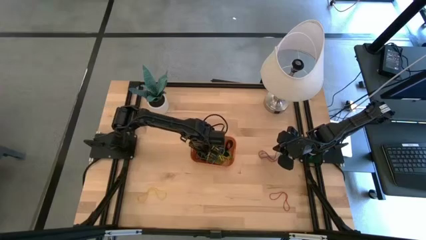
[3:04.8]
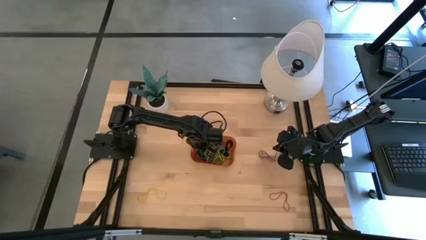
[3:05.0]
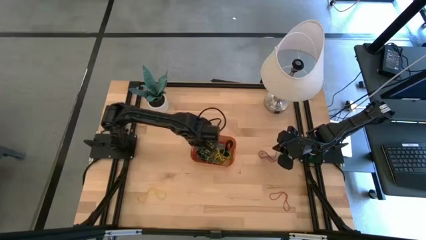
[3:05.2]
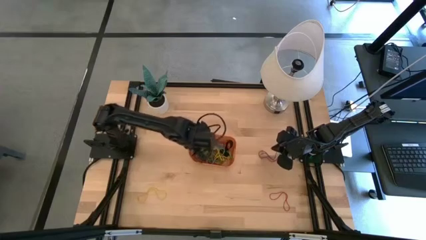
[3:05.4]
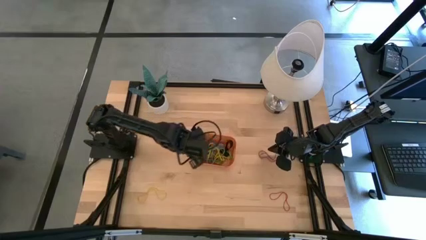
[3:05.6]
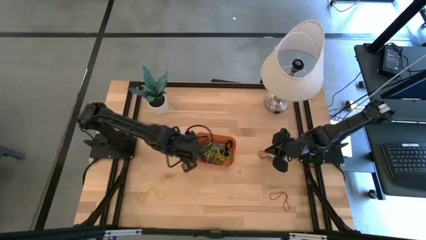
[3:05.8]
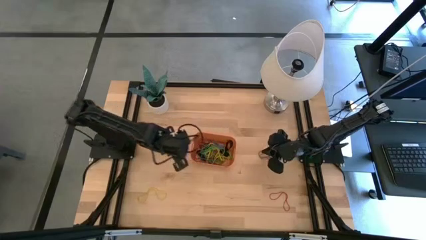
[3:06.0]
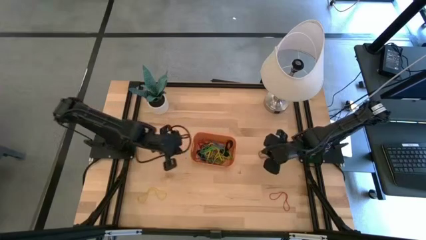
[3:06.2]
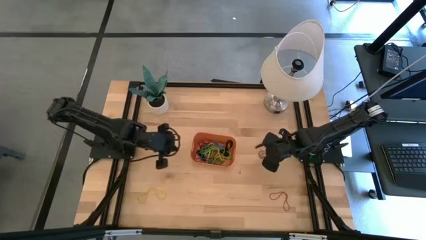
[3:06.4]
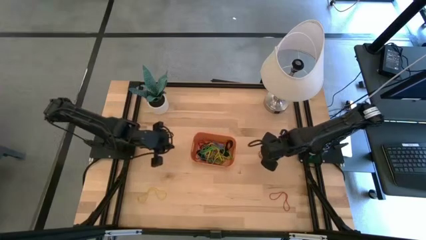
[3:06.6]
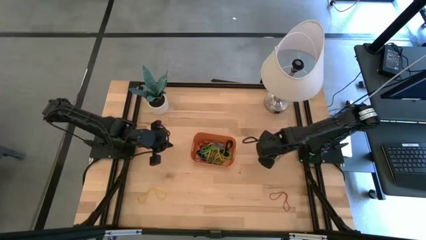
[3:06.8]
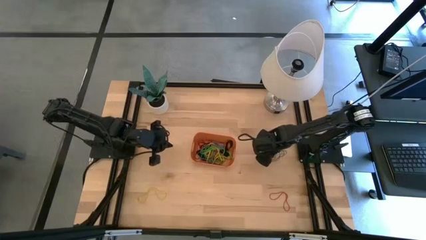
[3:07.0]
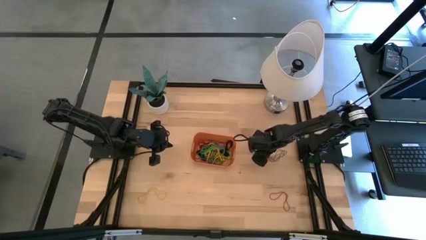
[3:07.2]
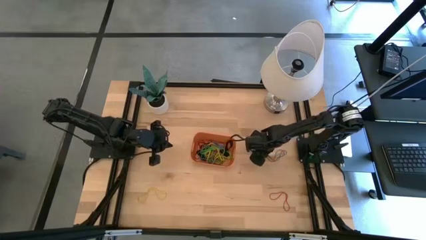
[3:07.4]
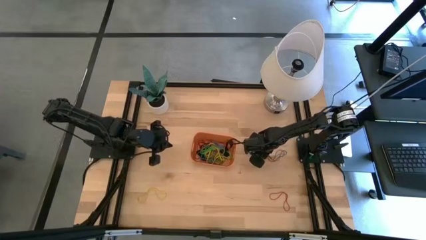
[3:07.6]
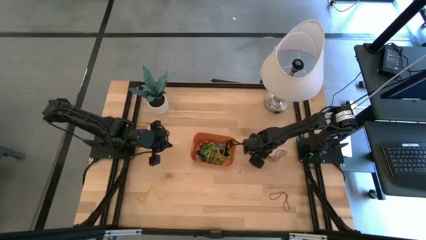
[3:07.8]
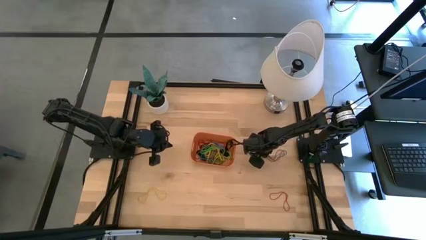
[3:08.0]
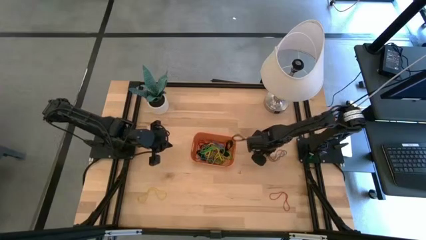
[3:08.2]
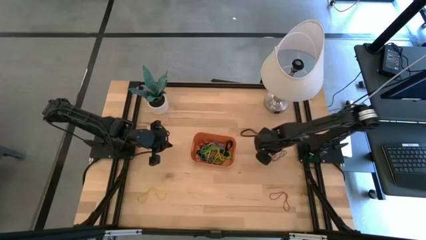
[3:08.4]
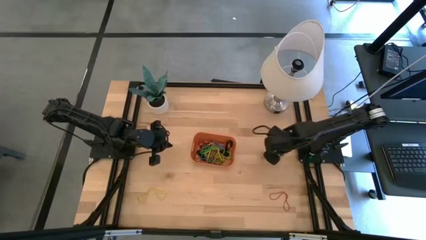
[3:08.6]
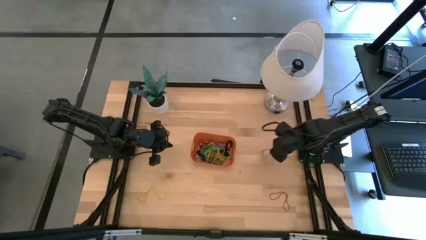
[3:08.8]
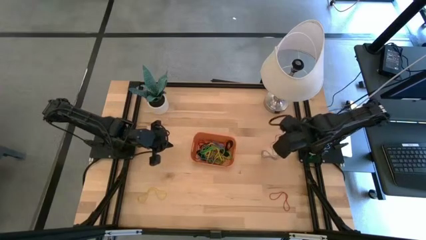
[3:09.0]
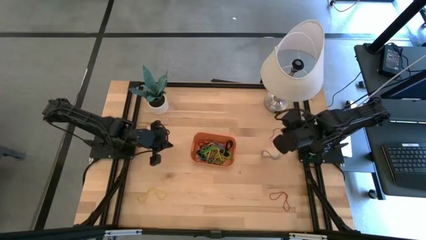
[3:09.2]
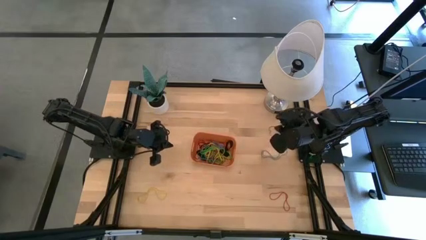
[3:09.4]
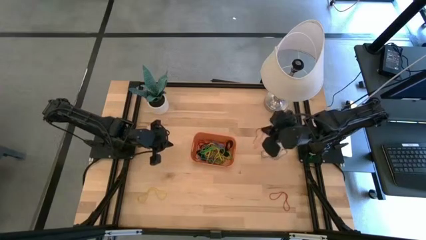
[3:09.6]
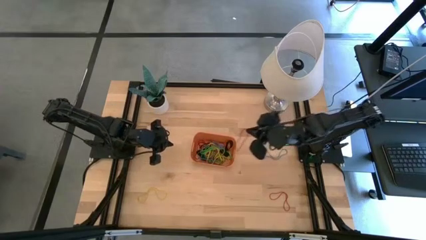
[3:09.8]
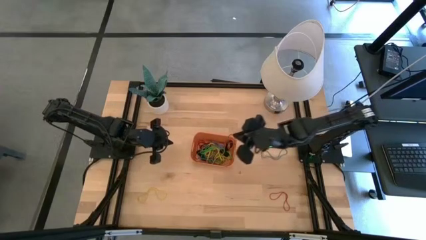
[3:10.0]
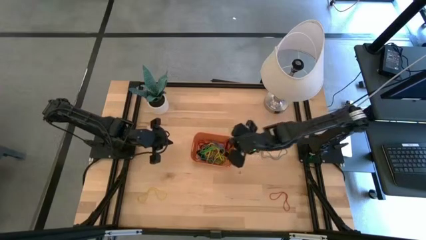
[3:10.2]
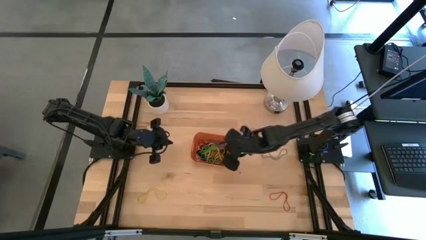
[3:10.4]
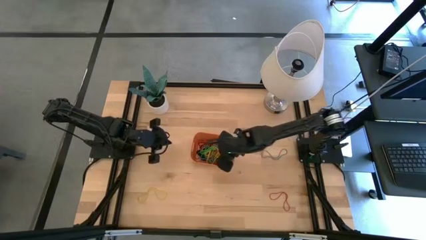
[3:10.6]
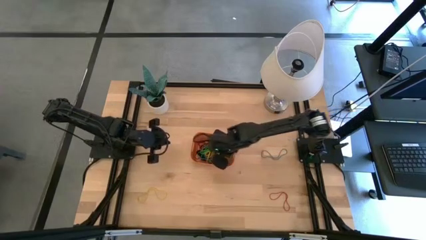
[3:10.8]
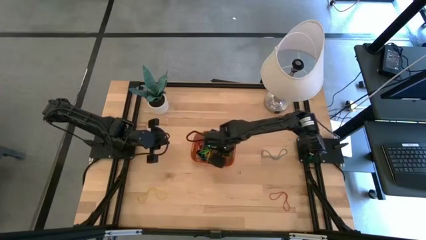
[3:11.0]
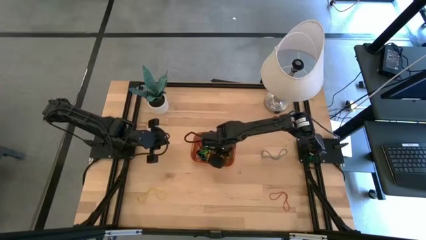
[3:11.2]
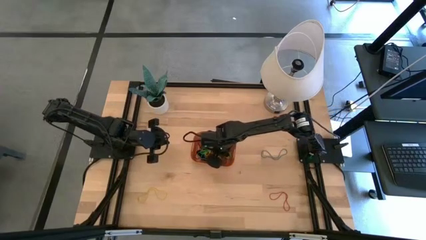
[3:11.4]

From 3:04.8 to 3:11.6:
Task: Pick and place rubber bands into bin
Put the red rubber band into the orange bin

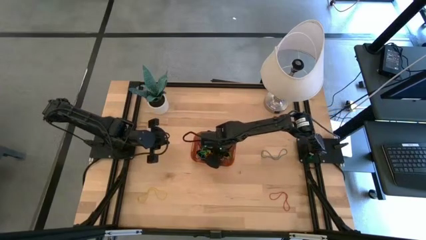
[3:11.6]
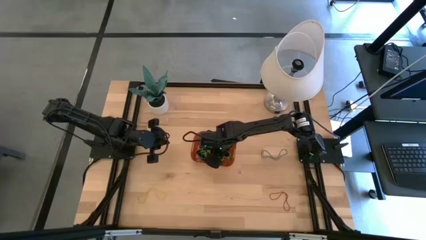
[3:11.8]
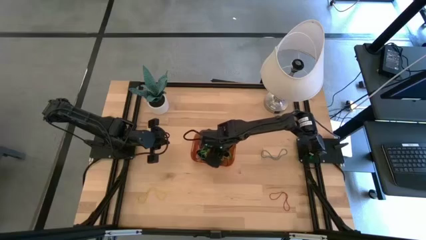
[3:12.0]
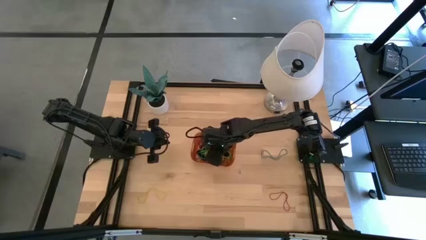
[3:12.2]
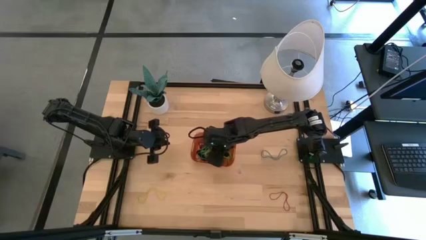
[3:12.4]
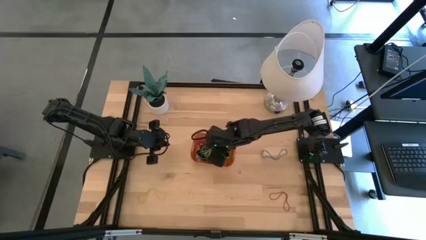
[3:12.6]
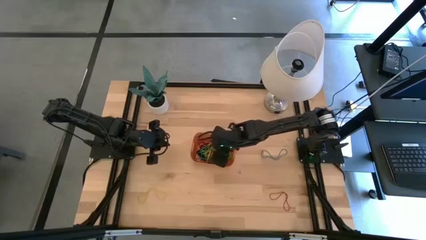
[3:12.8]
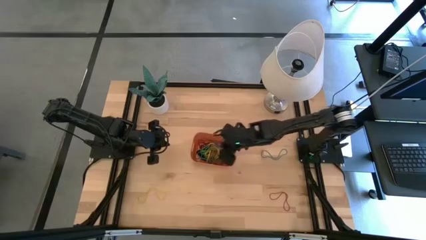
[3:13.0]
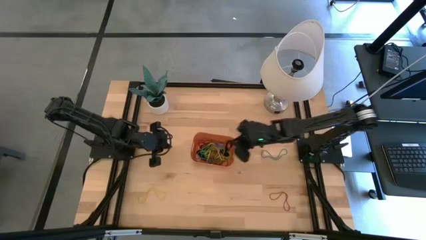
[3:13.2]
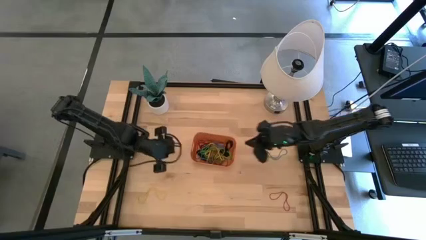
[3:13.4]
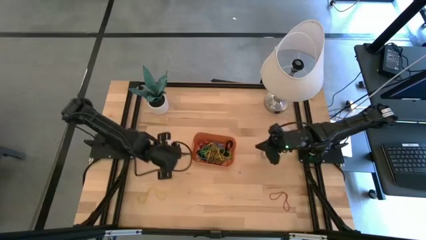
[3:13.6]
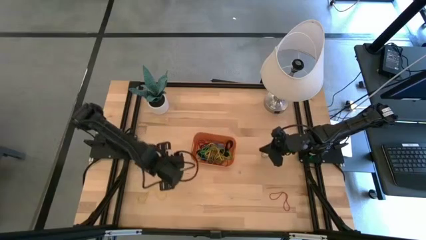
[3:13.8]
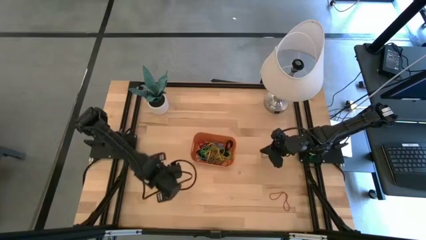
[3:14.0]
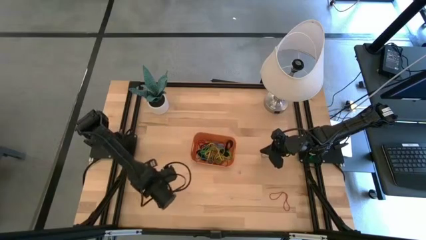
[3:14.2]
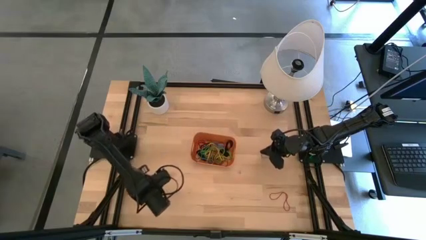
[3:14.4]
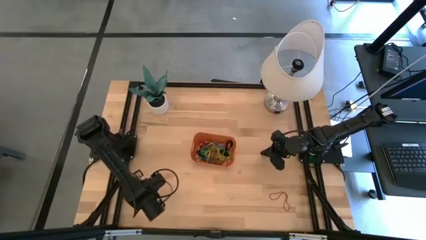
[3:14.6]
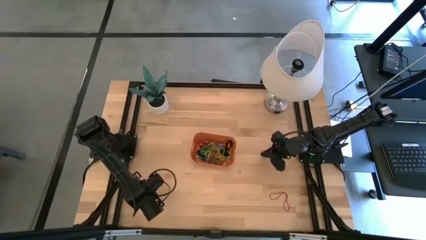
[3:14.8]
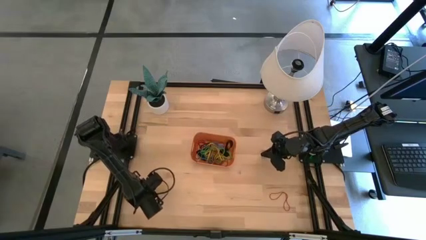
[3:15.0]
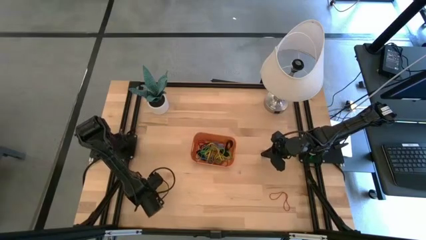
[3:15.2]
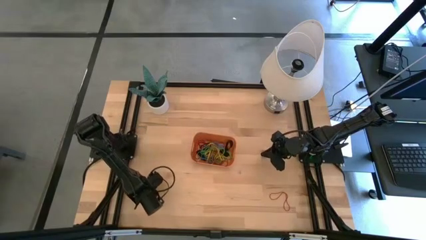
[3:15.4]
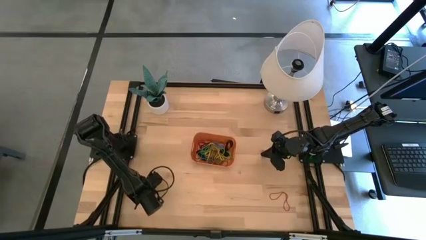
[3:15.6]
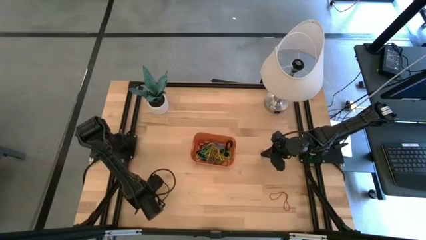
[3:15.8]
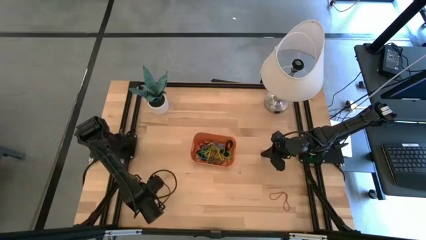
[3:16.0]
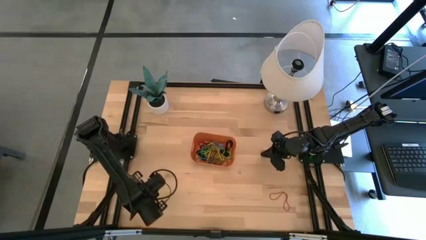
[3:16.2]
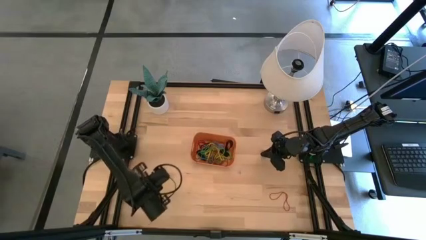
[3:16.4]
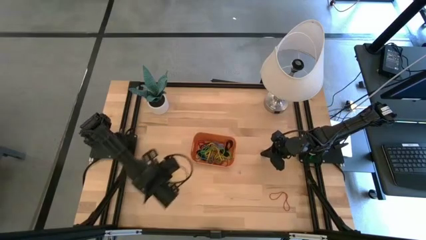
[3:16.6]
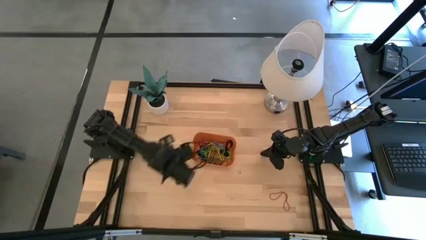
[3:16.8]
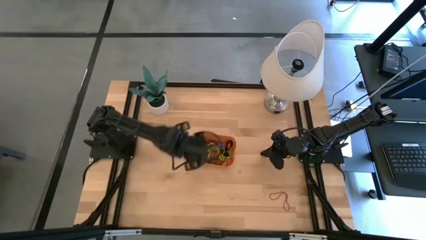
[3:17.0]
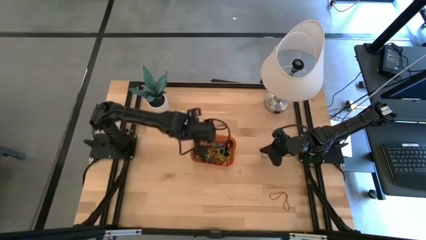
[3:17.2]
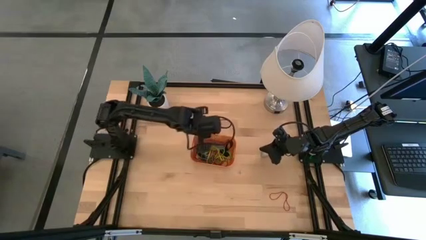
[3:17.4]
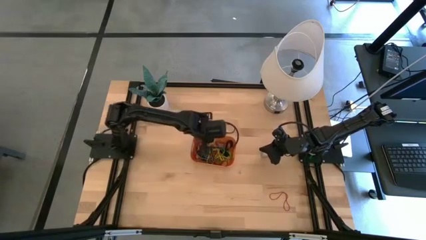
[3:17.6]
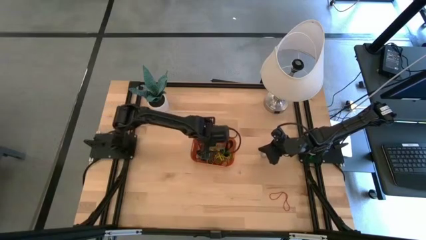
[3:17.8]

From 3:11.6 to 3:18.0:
Put the yellow rubber band into the orange bin
